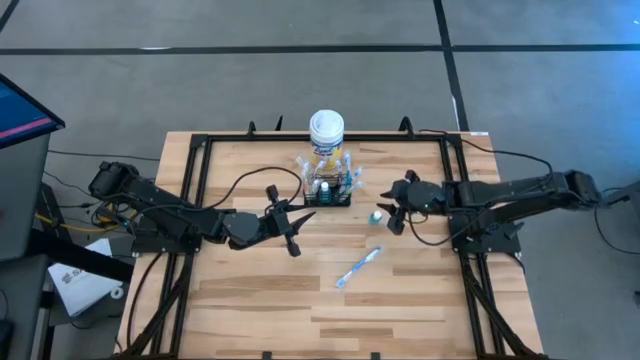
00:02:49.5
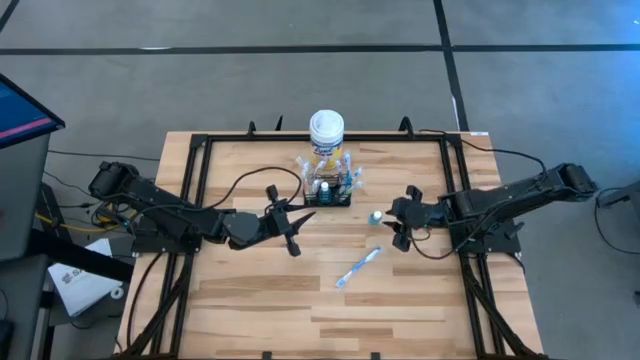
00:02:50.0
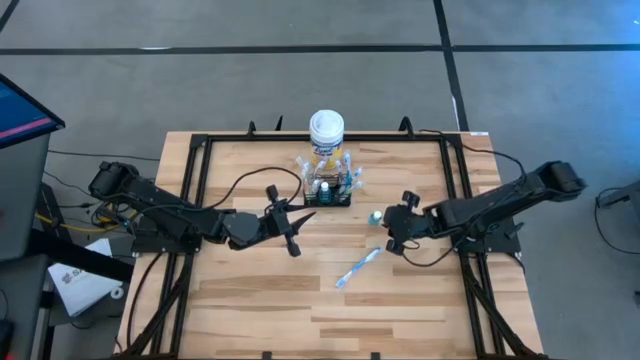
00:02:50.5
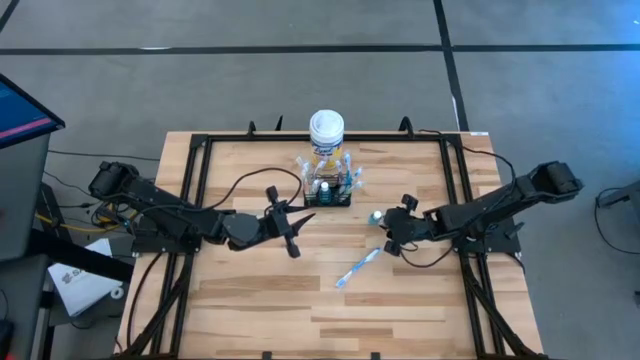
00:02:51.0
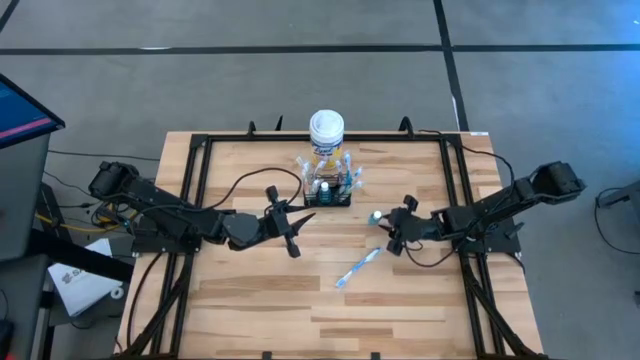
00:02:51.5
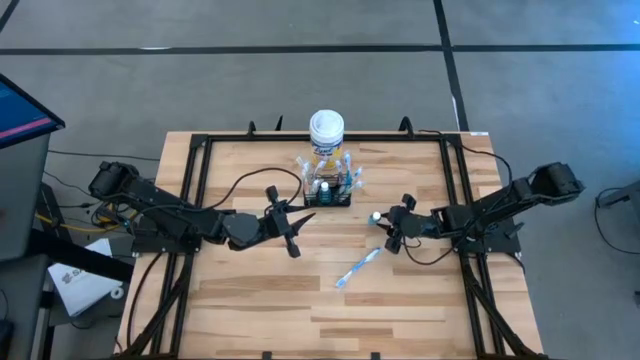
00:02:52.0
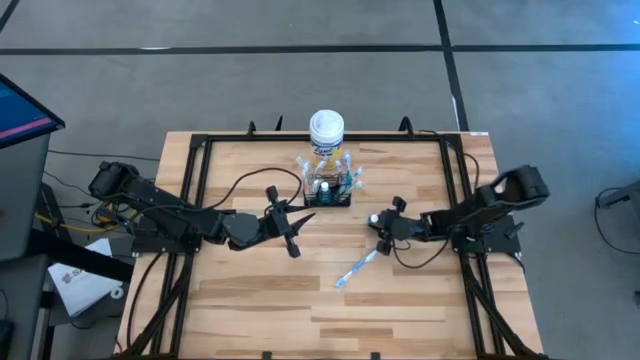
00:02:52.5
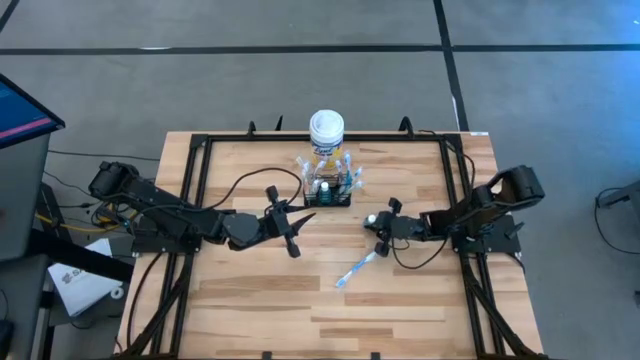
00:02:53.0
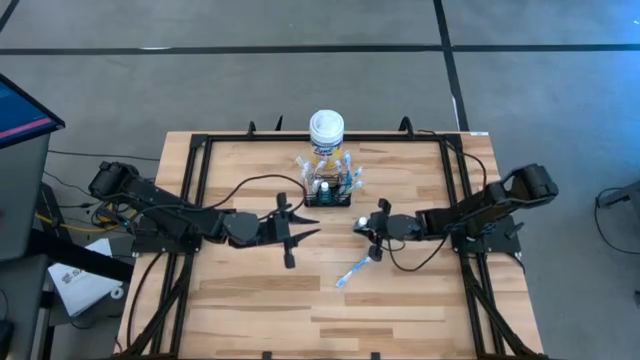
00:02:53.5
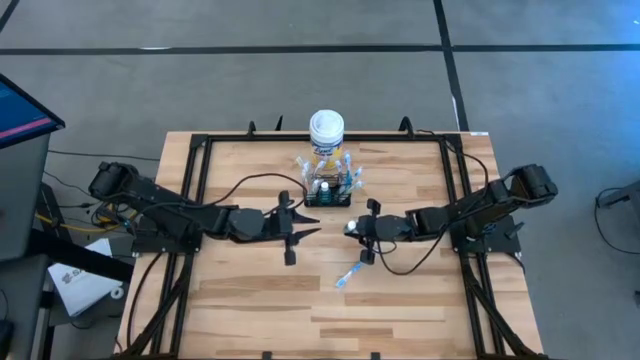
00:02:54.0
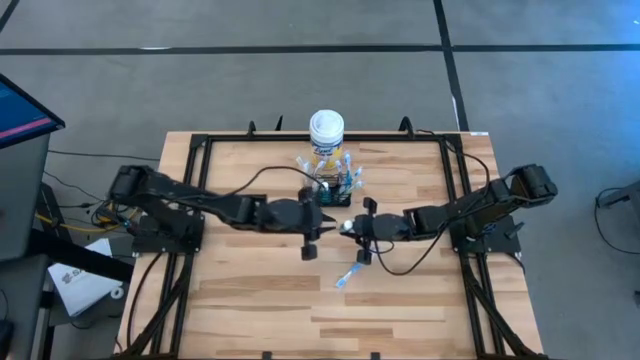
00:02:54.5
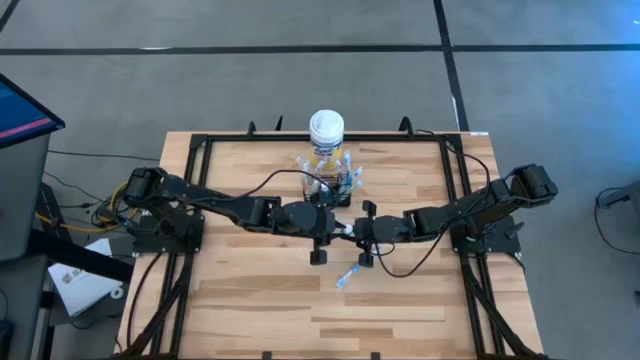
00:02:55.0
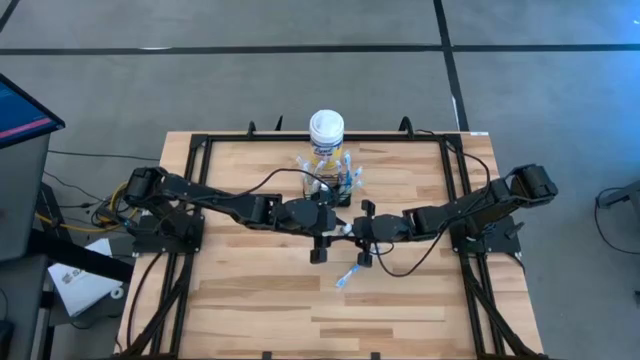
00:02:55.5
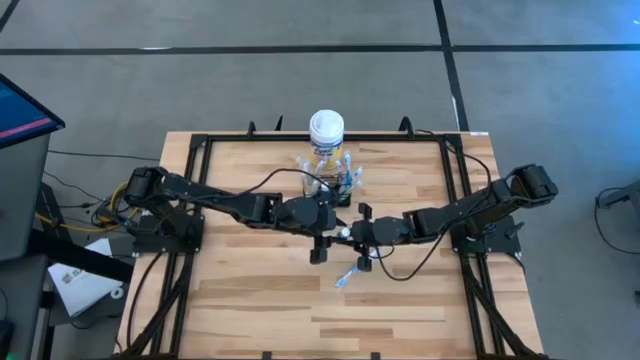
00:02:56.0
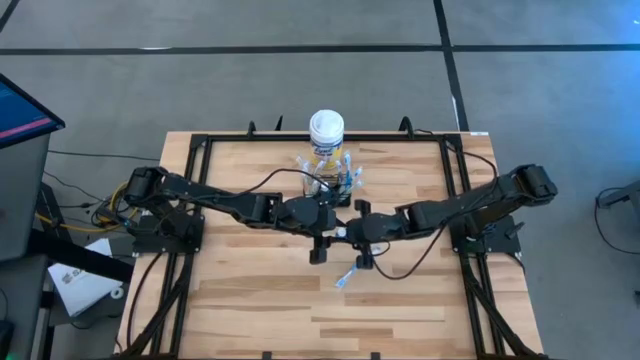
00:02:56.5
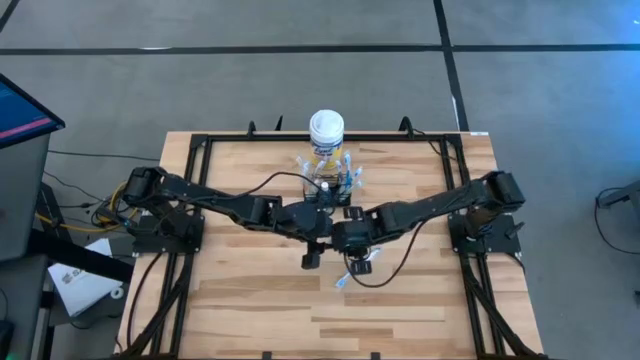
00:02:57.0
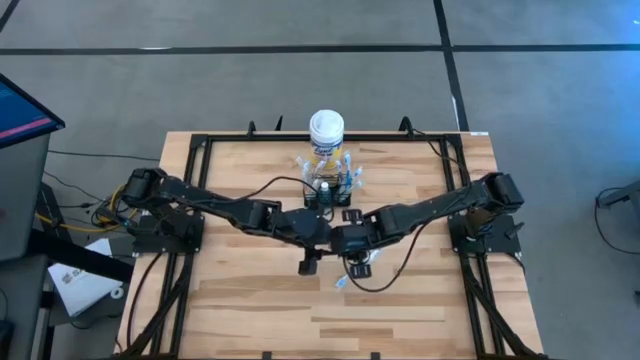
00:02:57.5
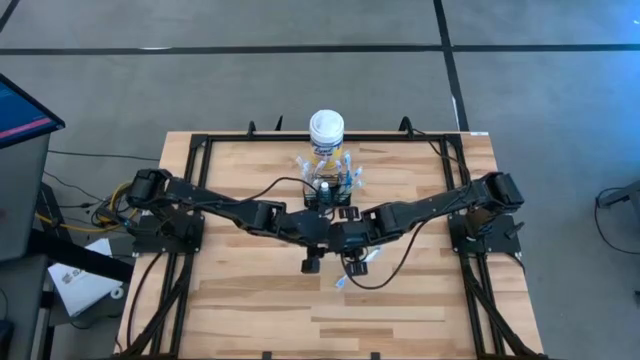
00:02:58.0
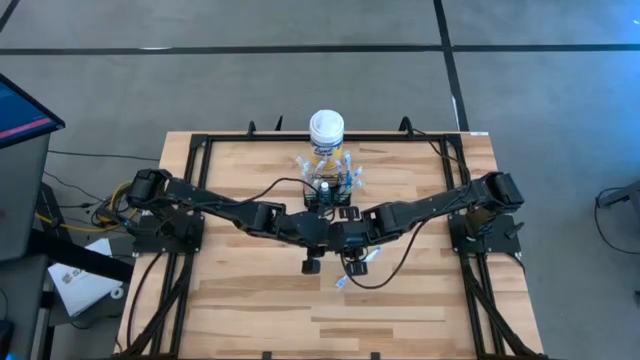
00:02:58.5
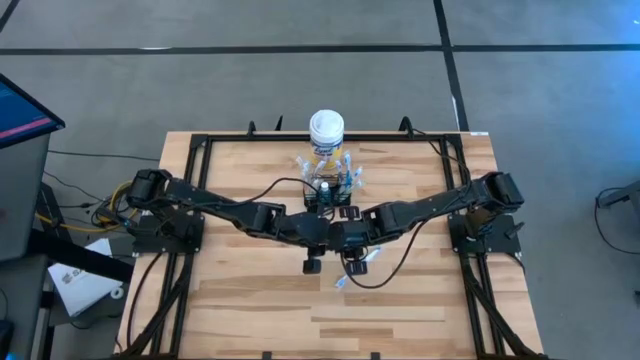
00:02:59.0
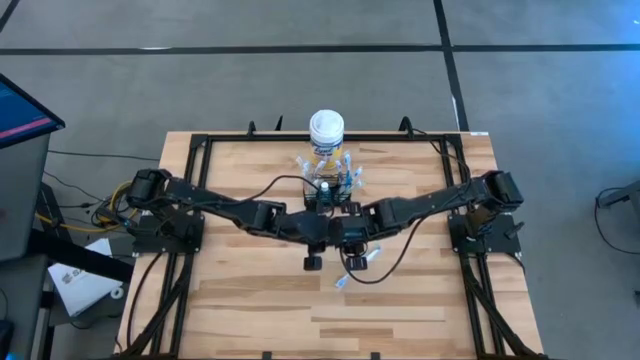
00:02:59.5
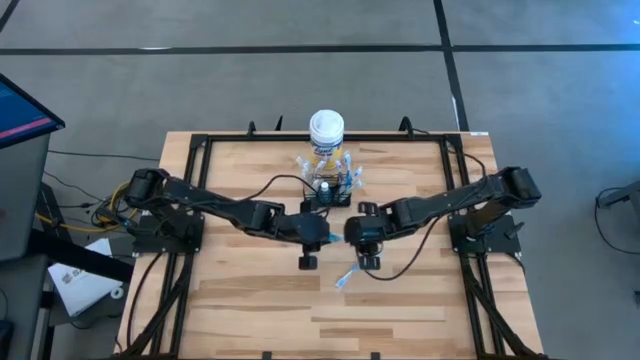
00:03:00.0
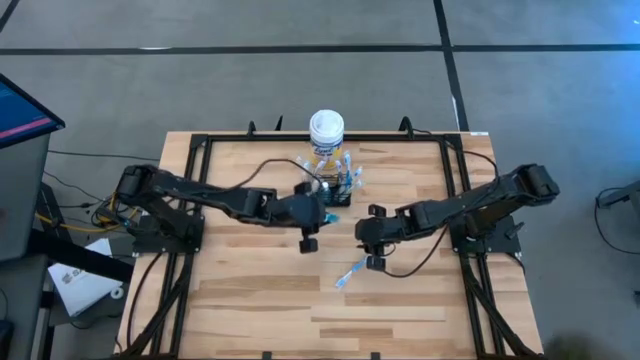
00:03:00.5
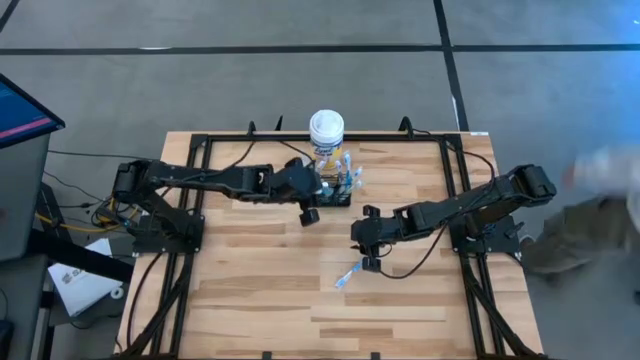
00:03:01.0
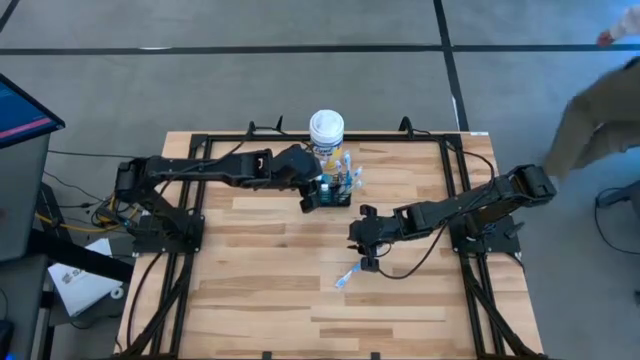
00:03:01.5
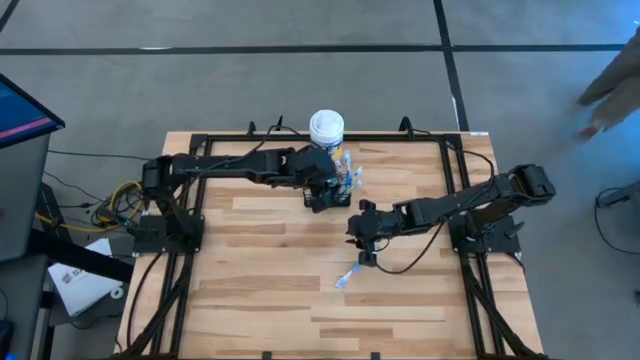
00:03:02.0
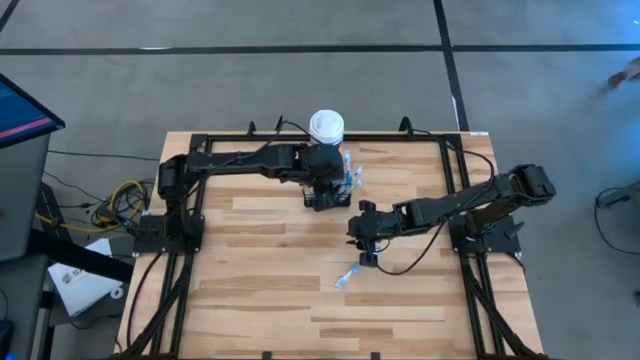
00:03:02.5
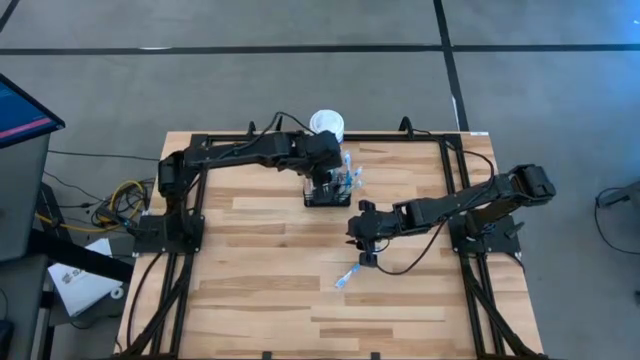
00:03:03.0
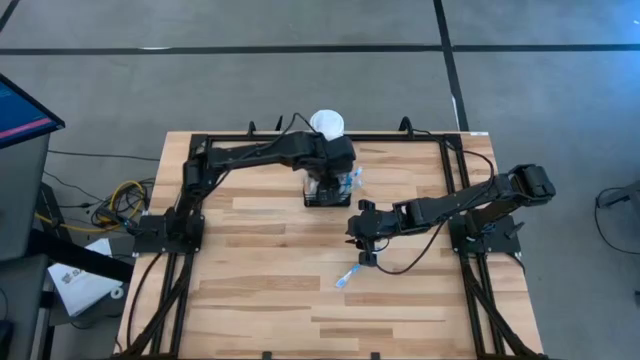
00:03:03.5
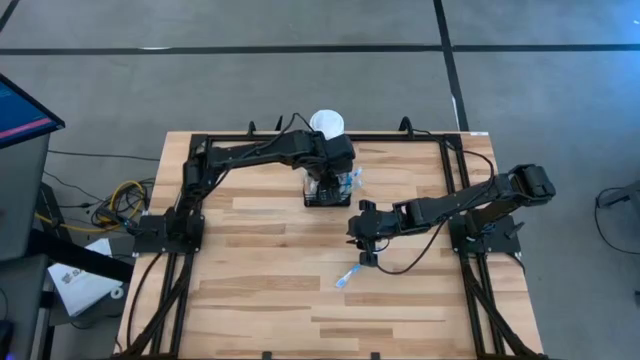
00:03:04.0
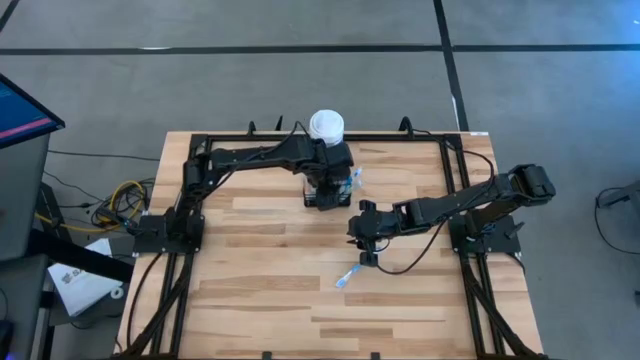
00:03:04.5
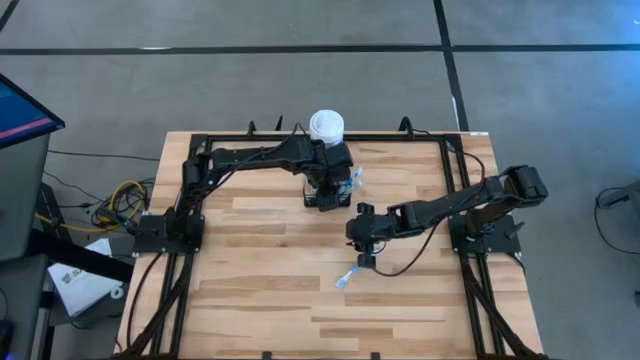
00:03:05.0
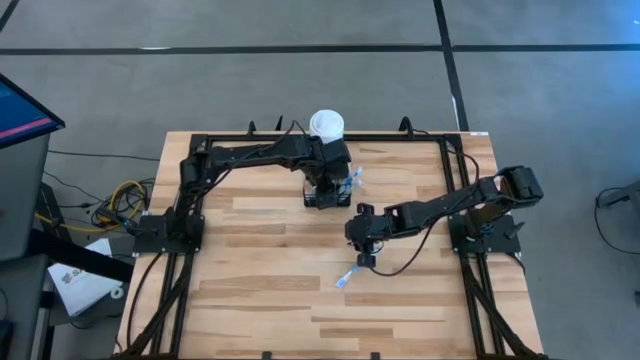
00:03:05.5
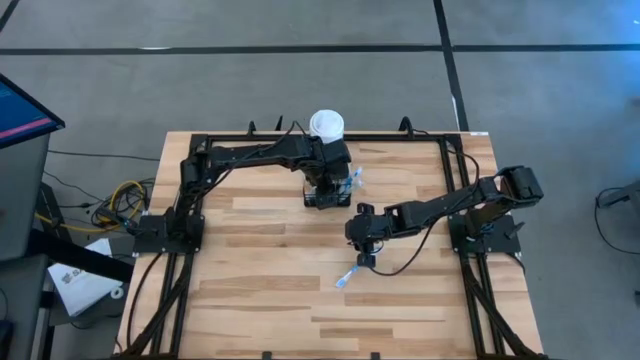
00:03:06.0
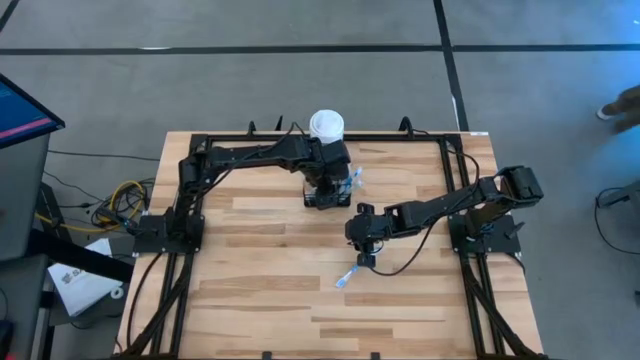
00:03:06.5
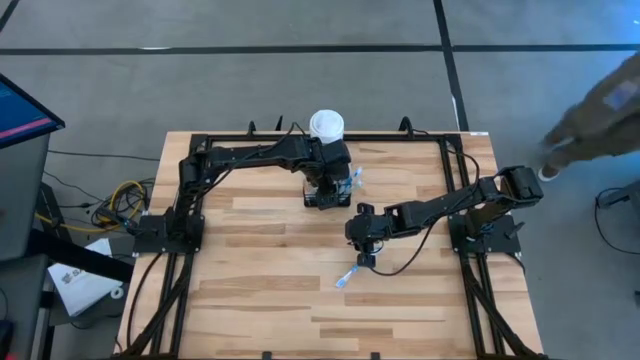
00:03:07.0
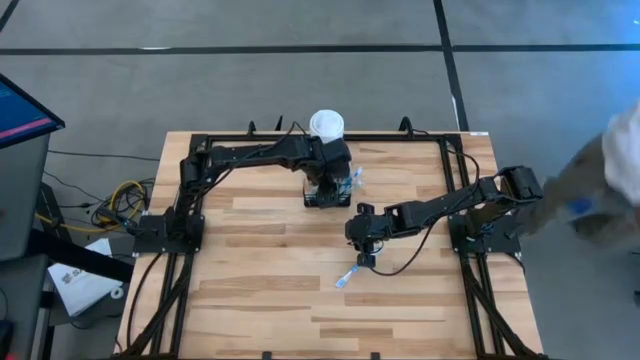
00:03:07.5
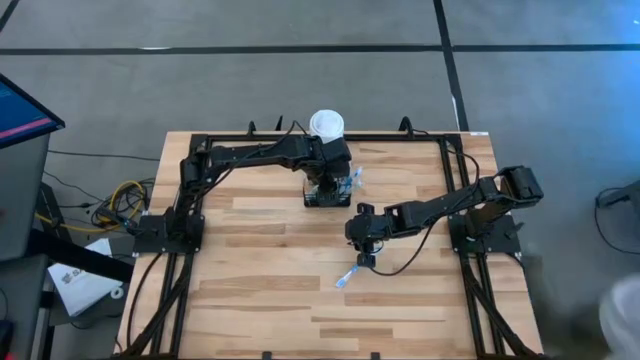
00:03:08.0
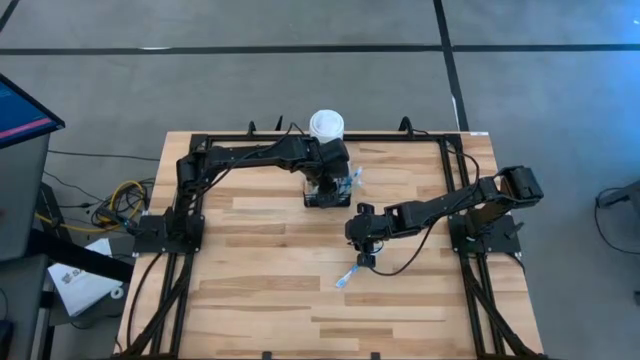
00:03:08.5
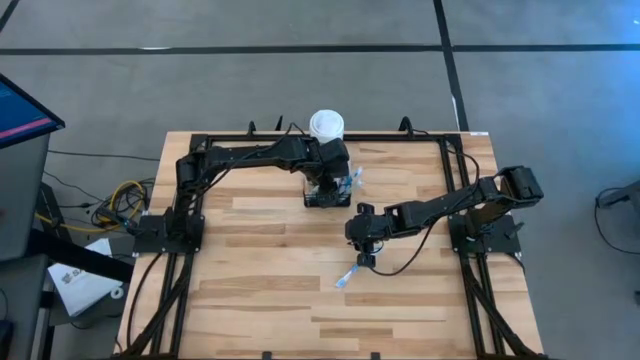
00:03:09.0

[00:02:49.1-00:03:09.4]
Task: Pick & Place toothbrushing station
Put the blue mouthwash bottle into the black wire organizer

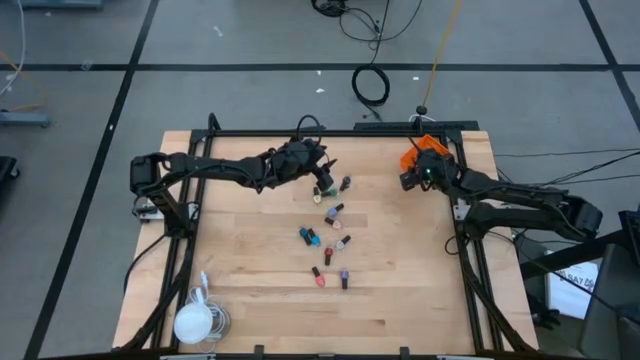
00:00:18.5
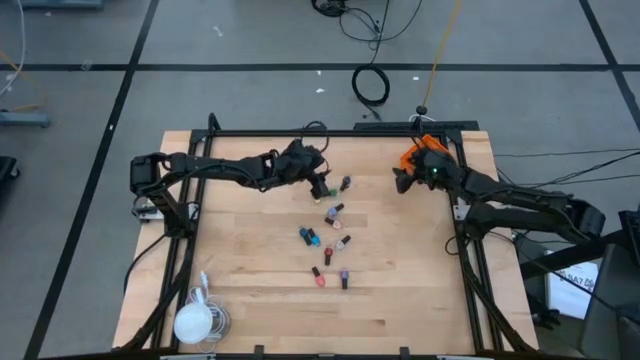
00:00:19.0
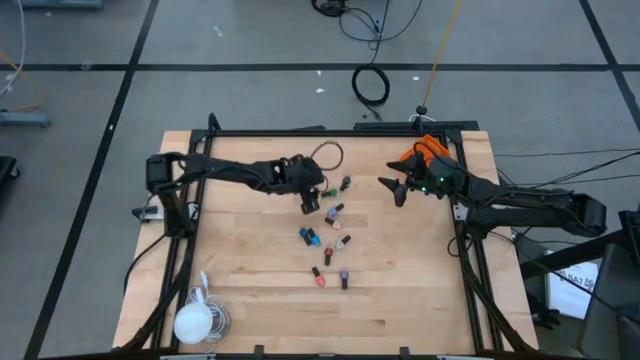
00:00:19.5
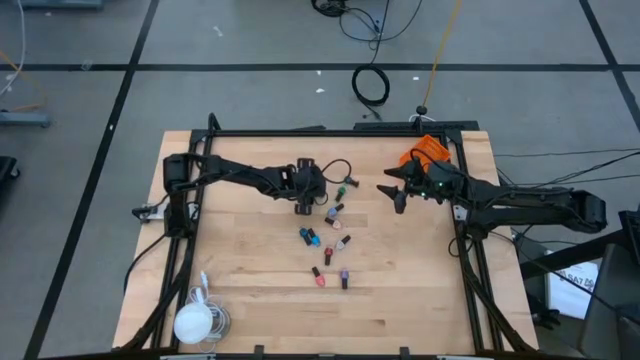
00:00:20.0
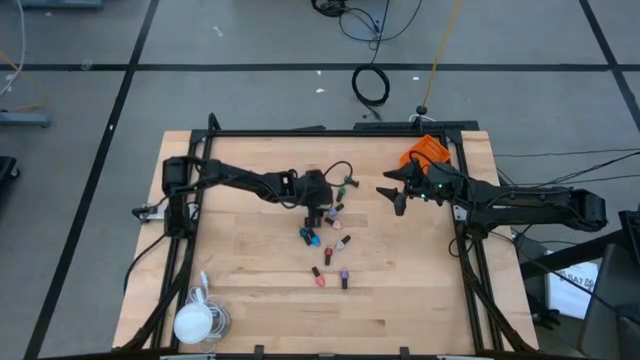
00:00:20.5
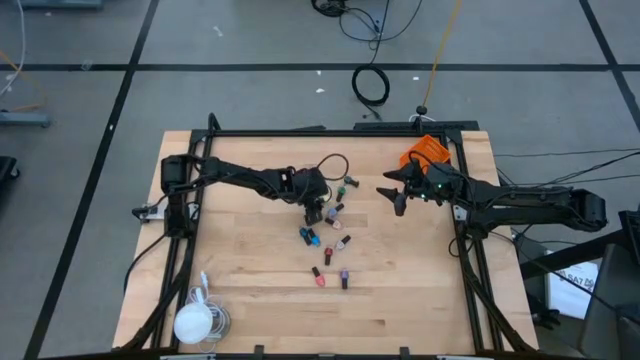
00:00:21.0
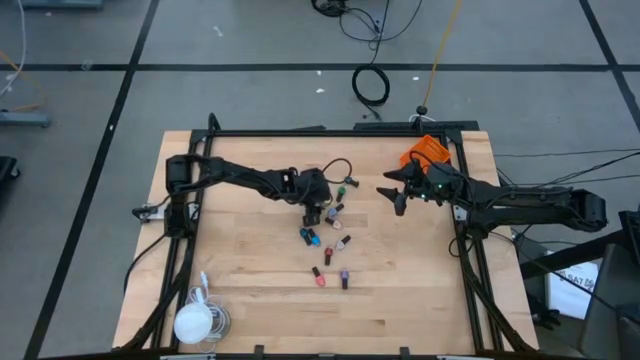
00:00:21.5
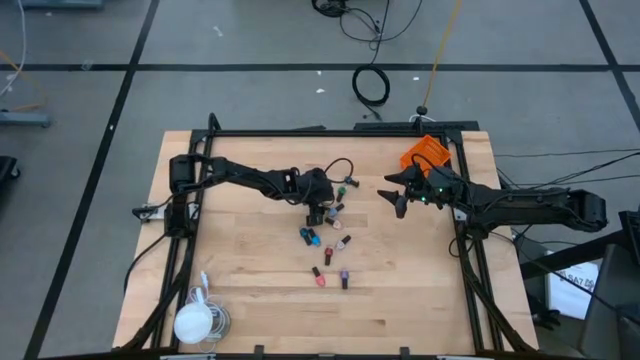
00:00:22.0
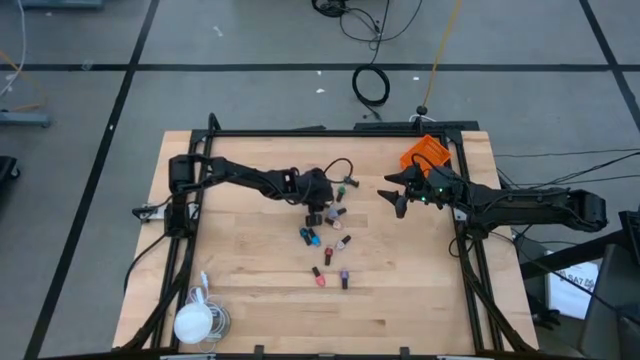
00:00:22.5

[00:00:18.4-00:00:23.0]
Task: Pick & Place Nail Polish
Put the yellow nail polish bottle into the orange basket
